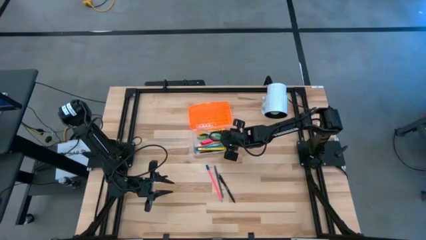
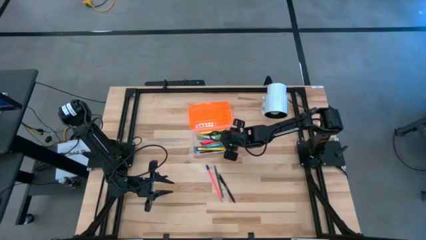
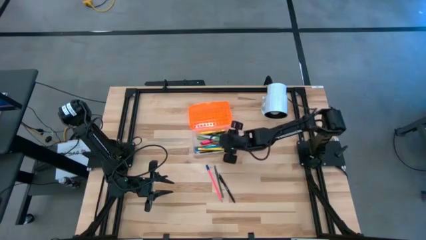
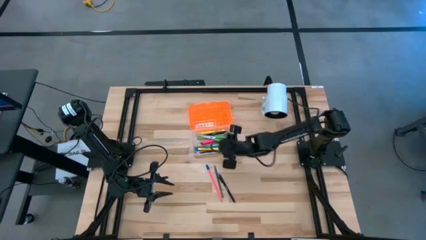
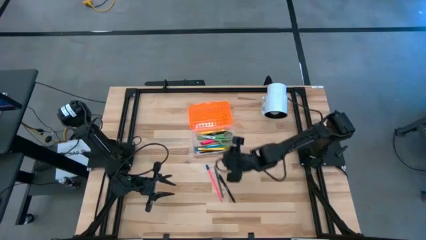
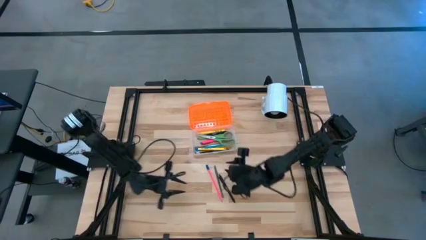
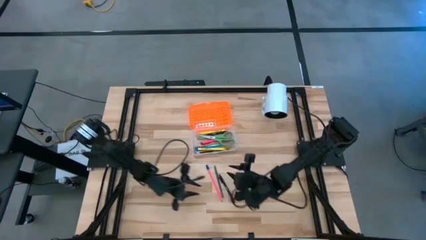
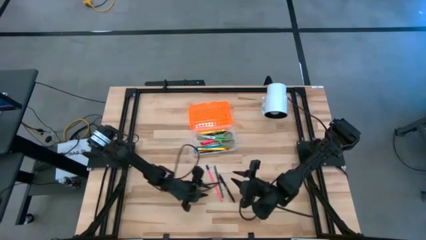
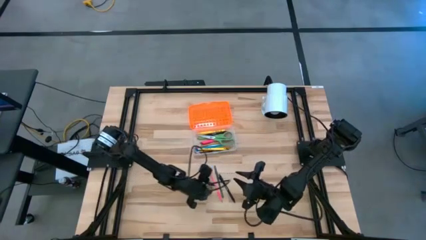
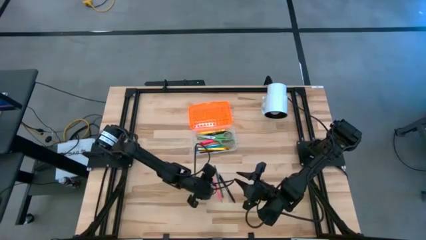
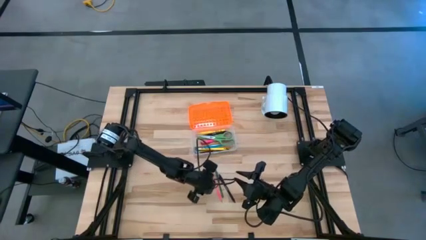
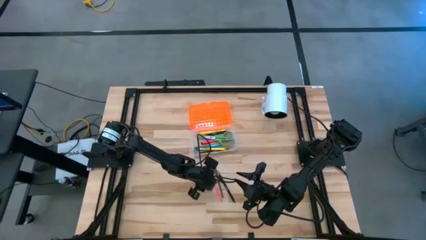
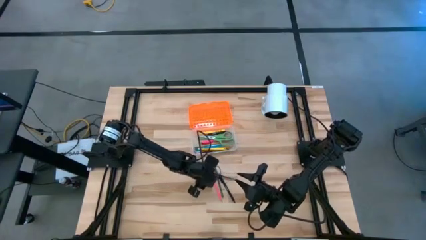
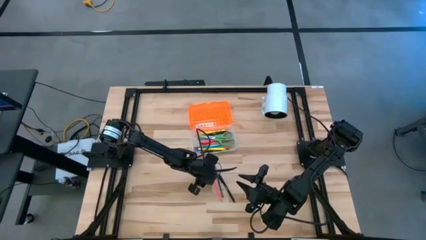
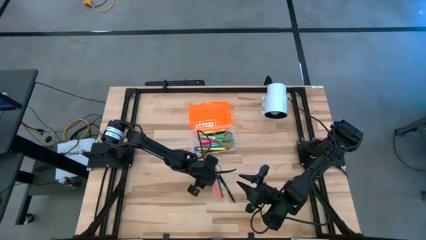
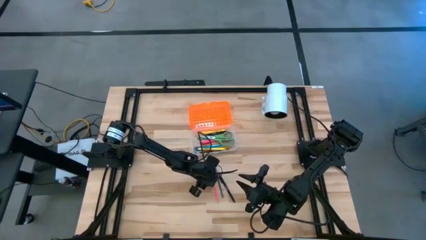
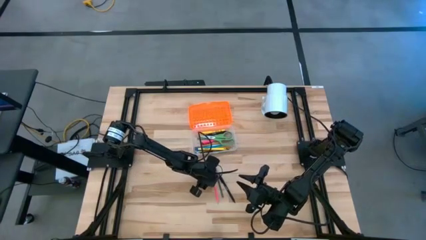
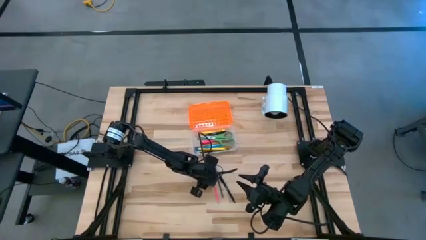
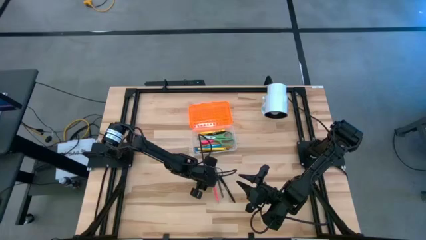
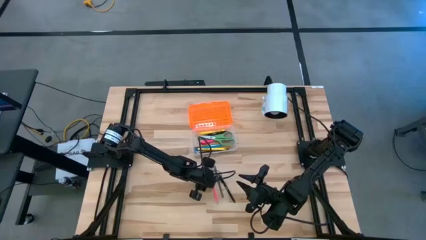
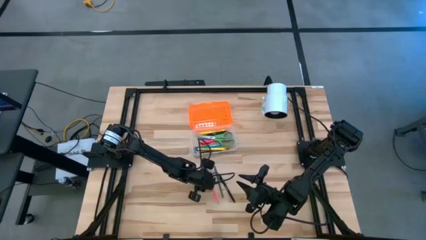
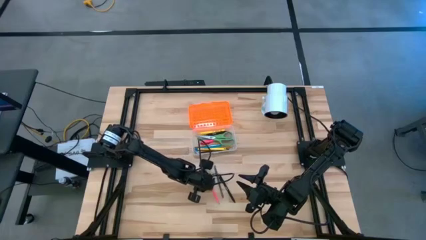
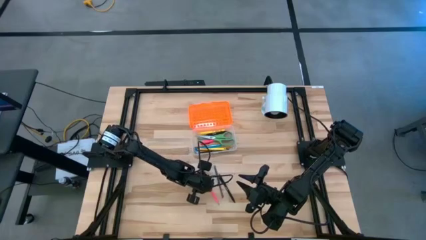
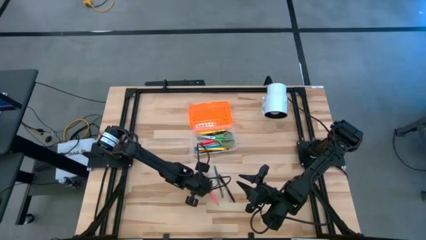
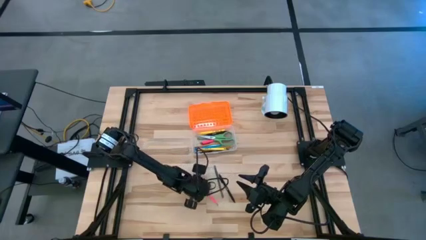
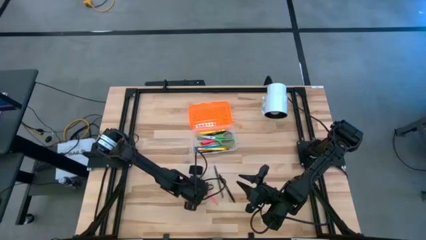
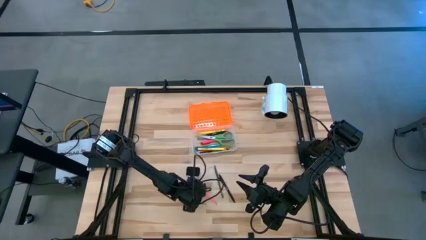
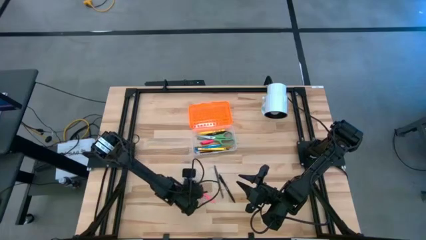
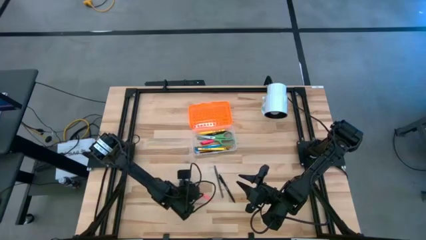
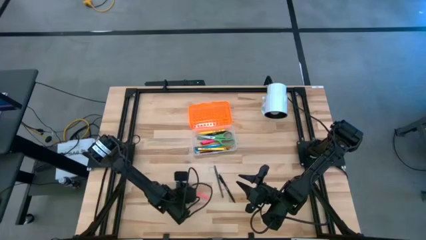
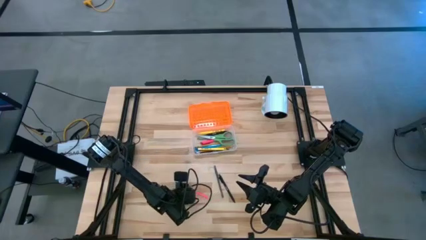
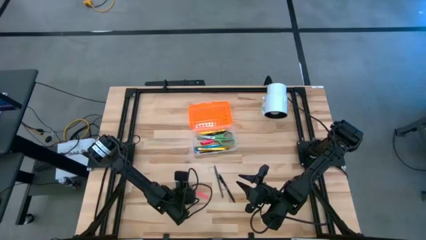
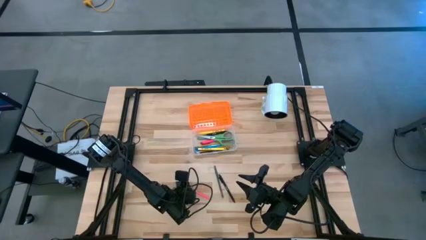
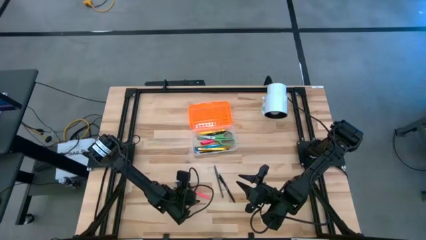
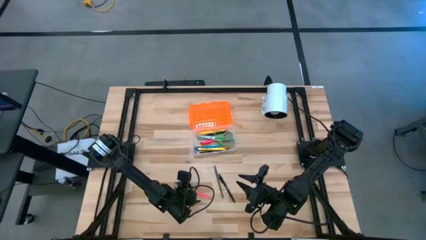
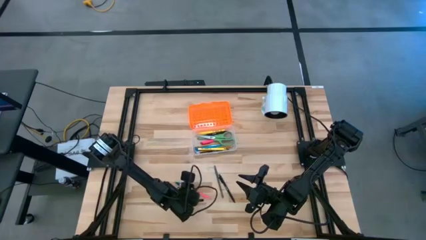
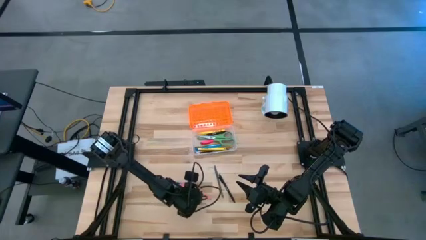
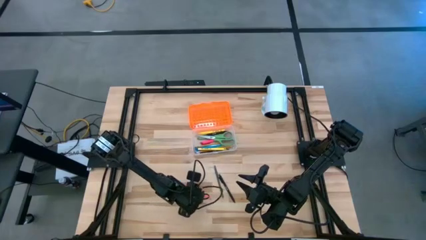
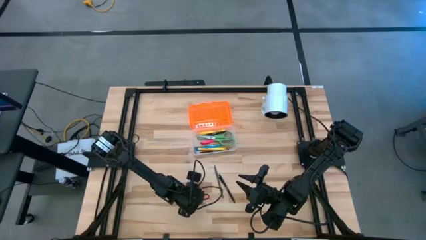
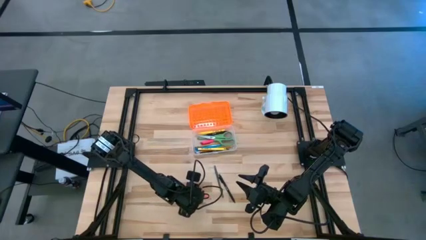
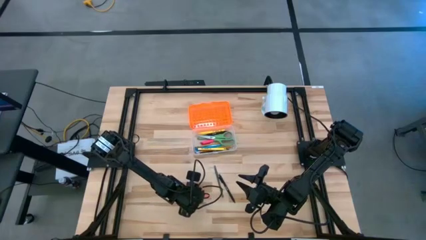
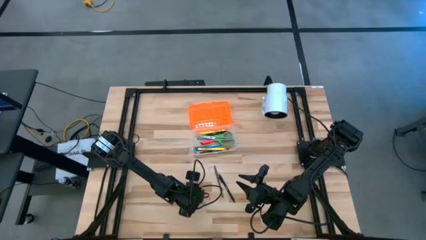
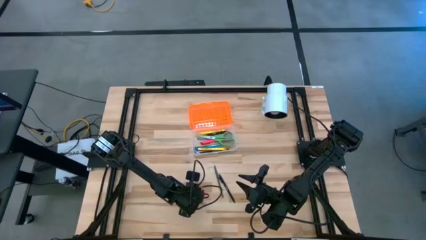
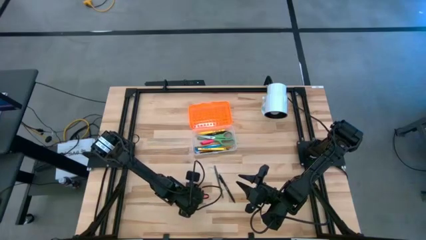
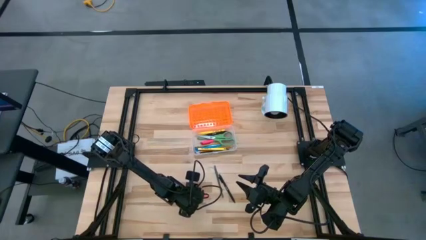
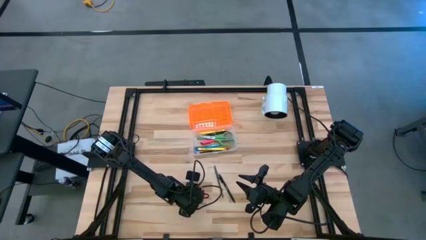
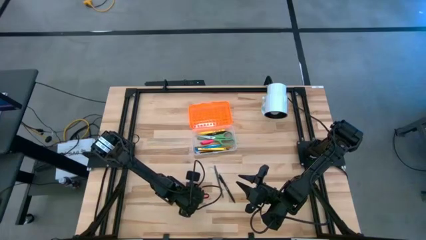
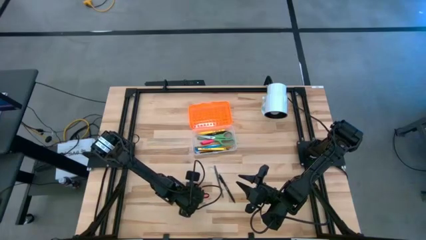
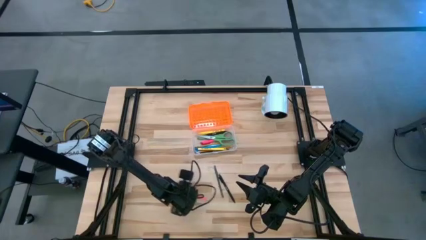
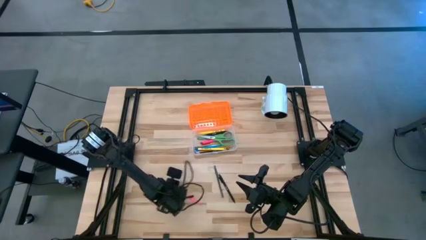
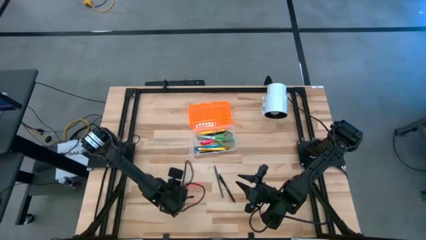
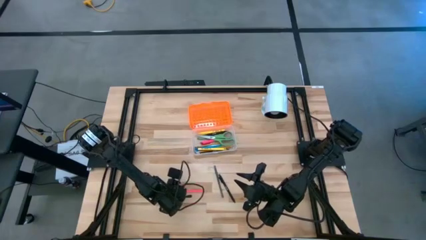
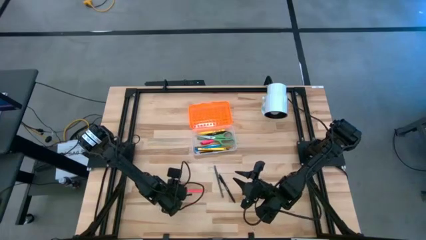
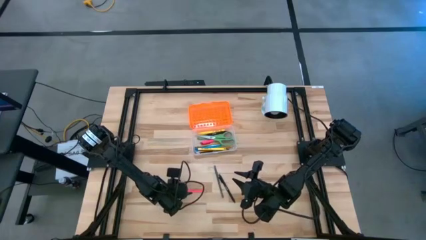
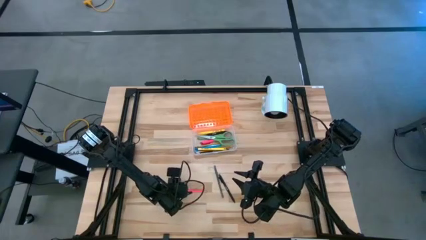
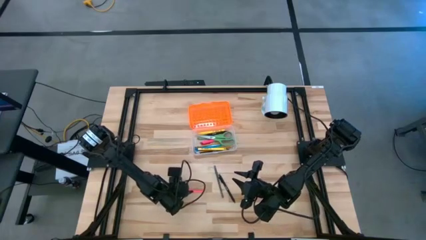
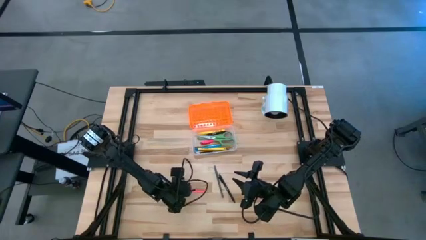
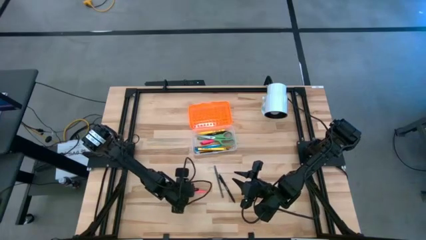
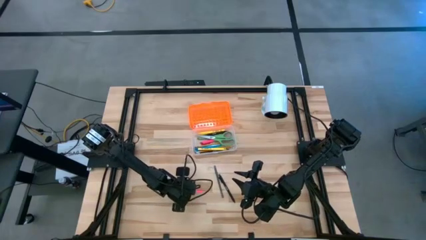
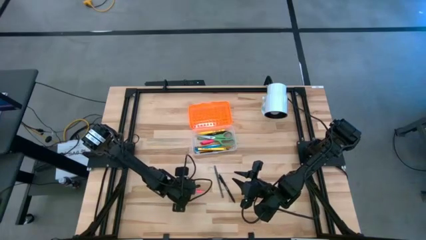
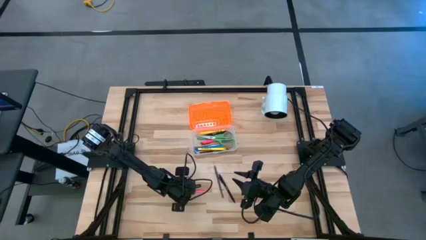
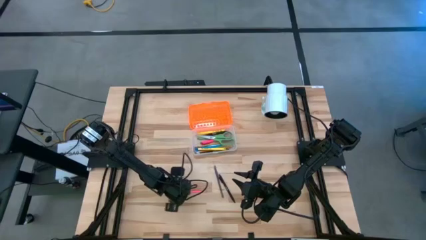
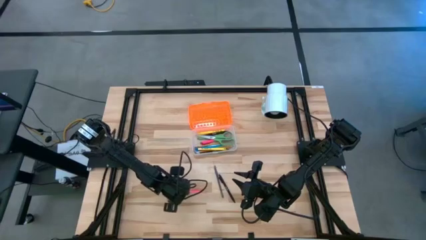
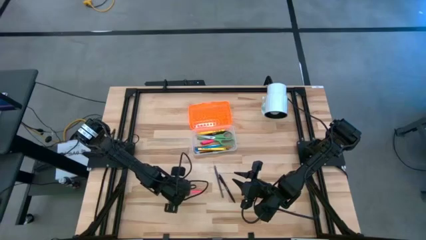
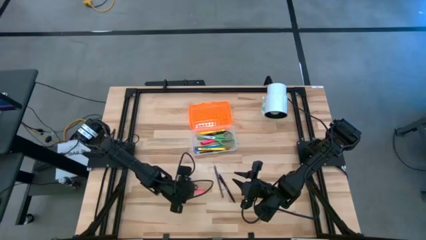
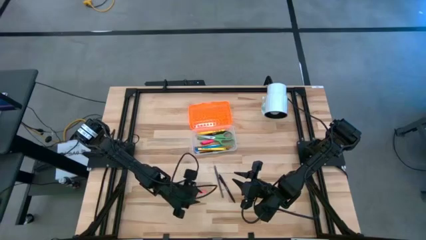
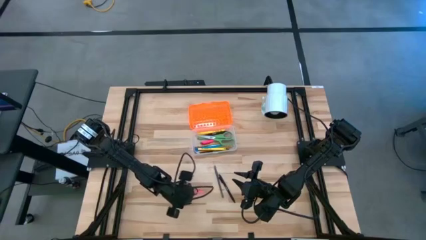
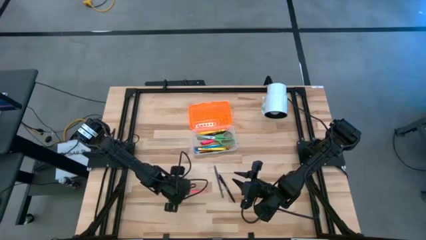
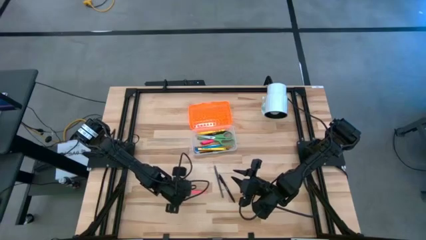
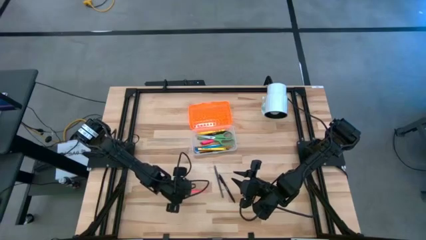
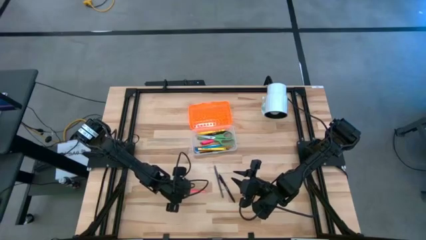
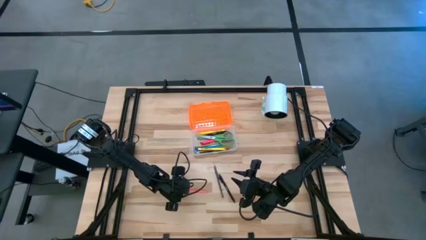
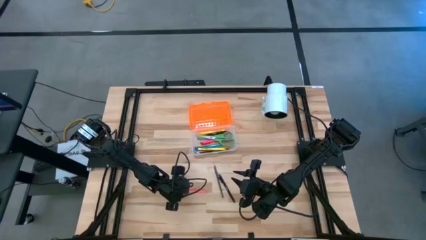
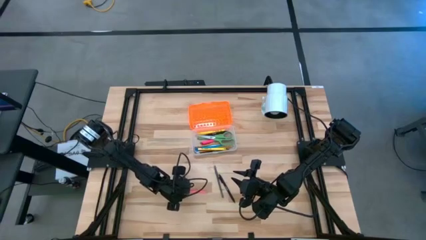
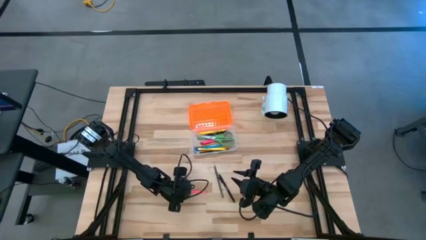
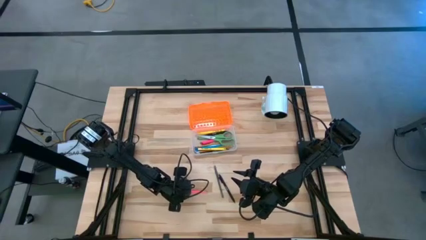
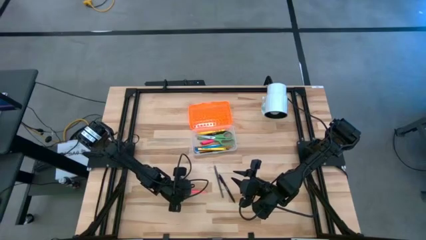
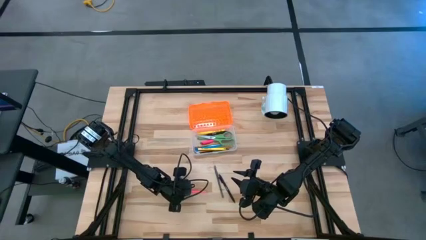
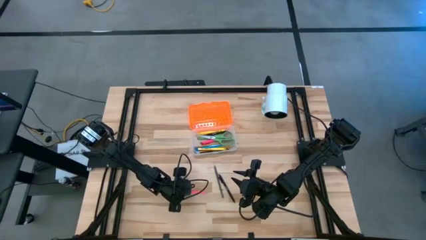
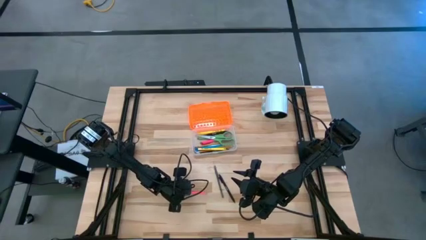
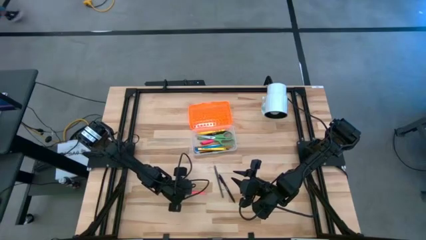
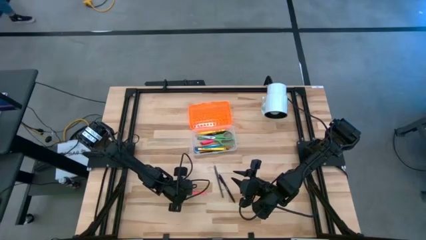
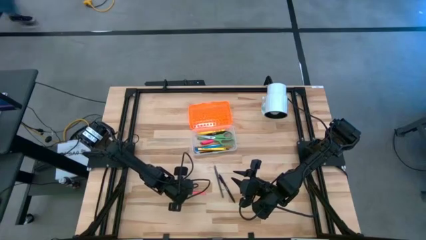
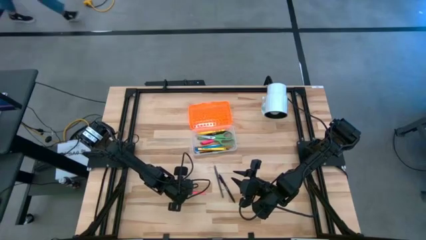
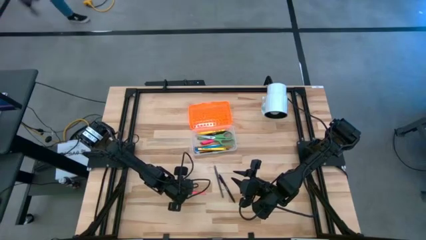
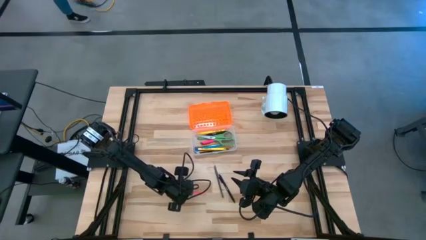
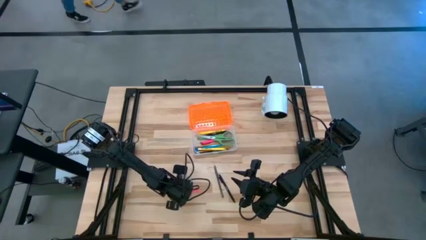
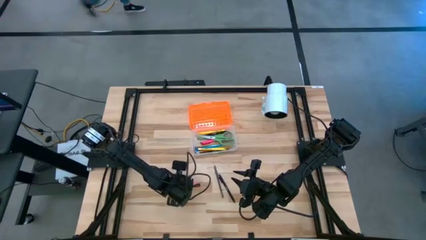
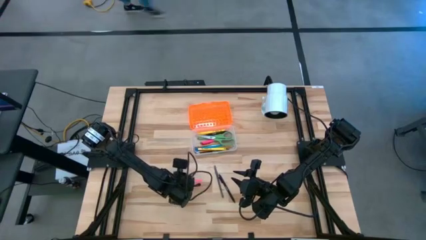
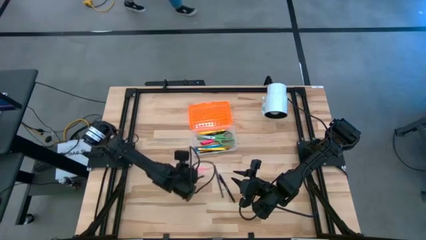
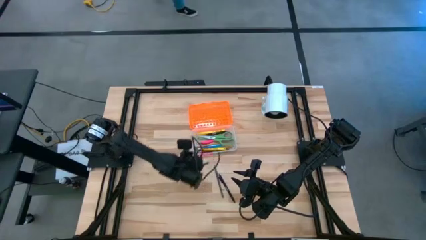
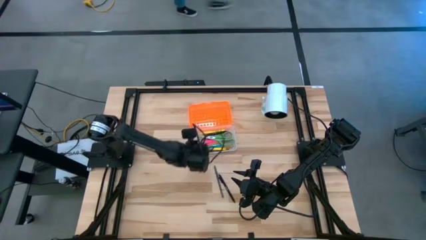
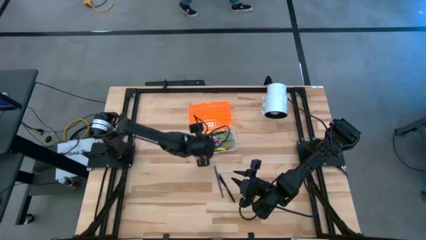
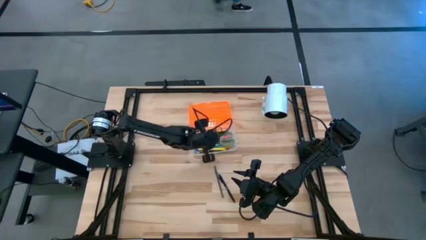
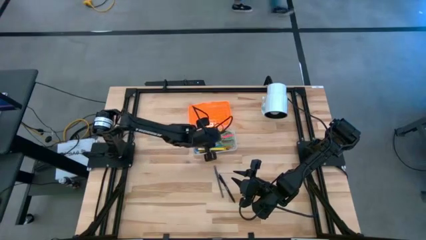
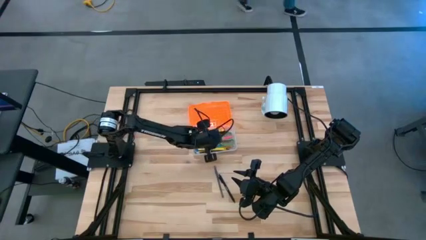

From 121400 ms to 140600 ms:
Task: Pick & place school supplies into a supply box
Put the pink pencil into the supply box
